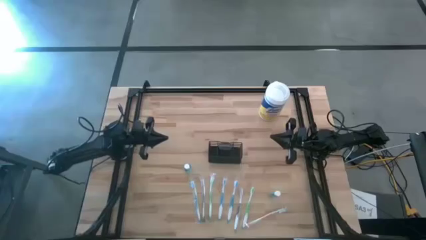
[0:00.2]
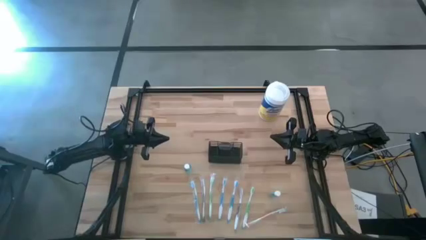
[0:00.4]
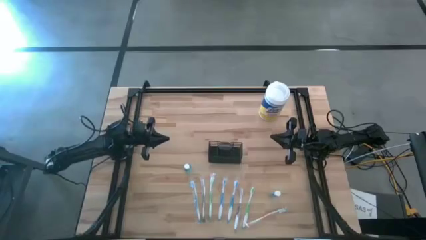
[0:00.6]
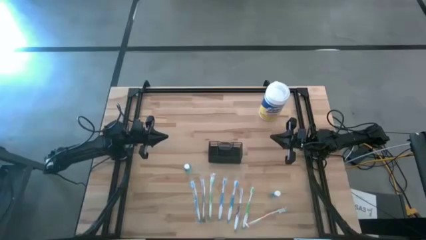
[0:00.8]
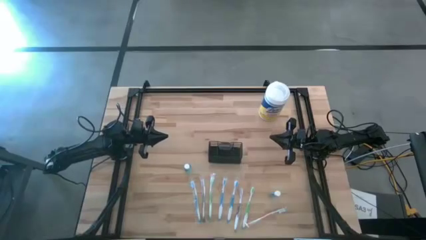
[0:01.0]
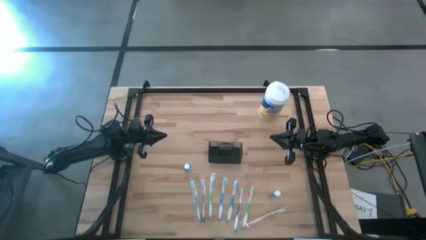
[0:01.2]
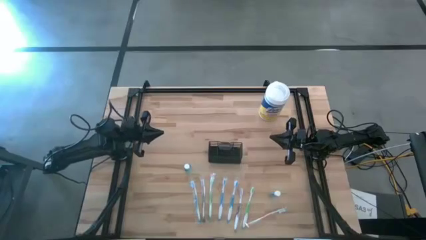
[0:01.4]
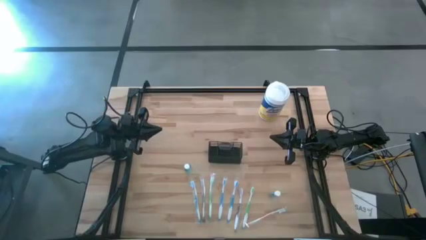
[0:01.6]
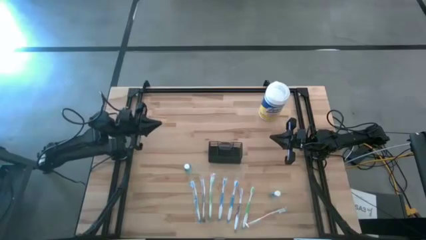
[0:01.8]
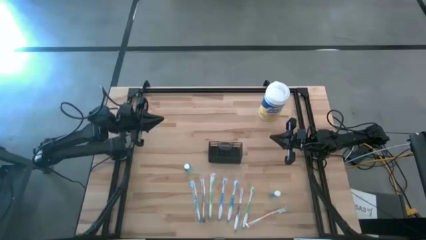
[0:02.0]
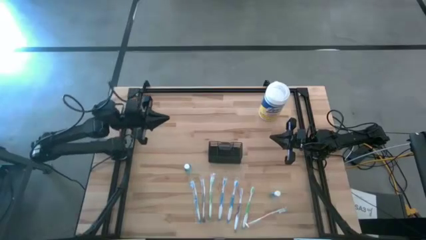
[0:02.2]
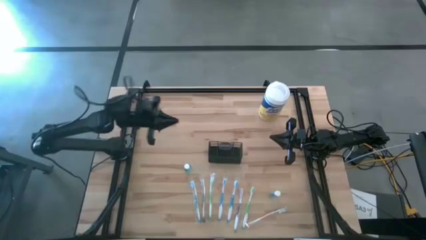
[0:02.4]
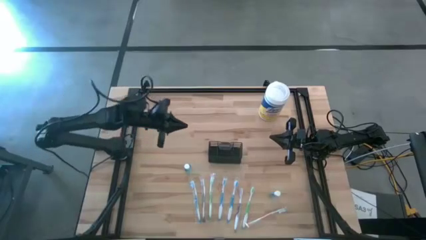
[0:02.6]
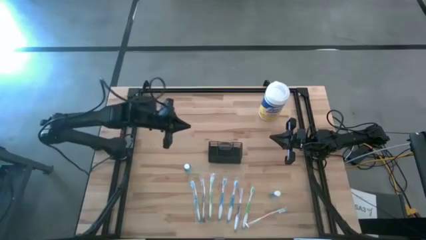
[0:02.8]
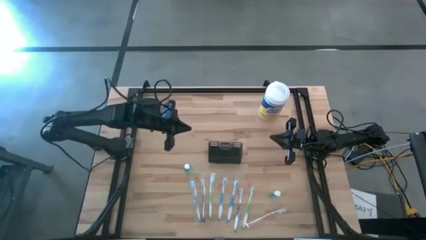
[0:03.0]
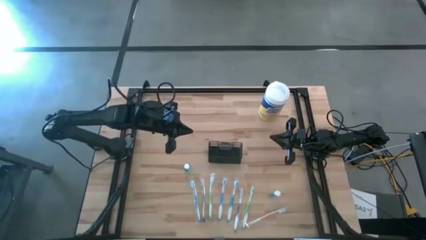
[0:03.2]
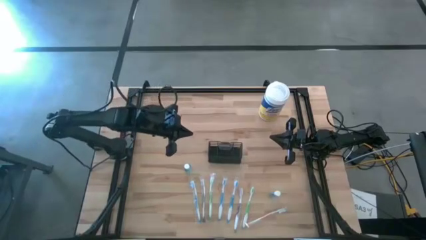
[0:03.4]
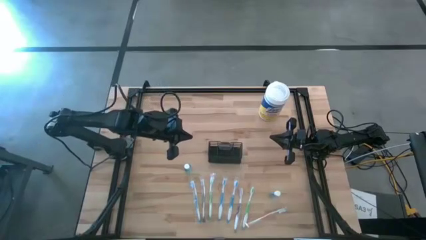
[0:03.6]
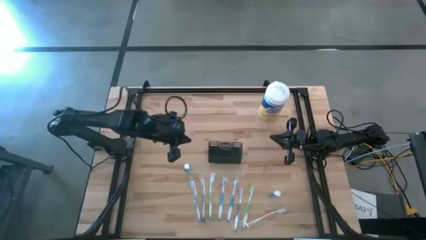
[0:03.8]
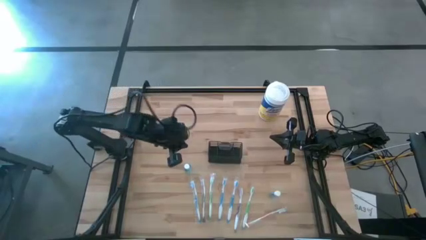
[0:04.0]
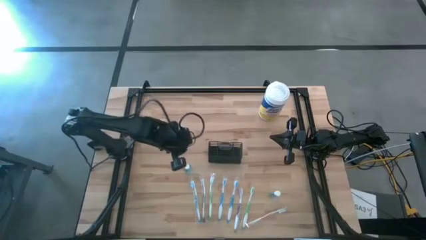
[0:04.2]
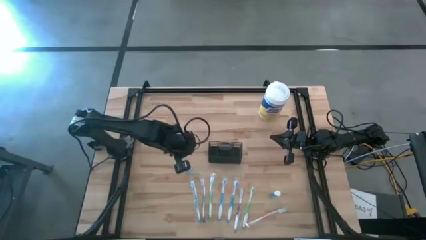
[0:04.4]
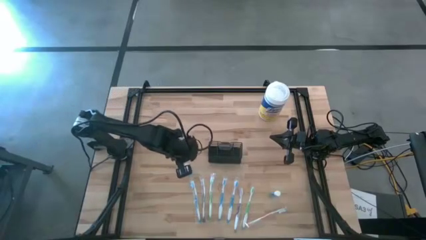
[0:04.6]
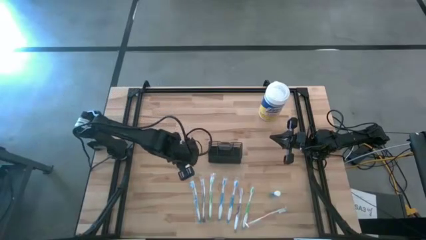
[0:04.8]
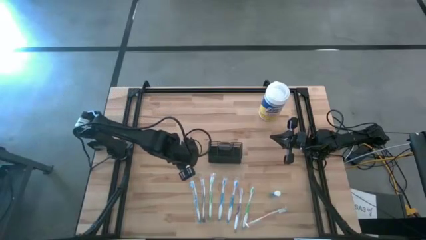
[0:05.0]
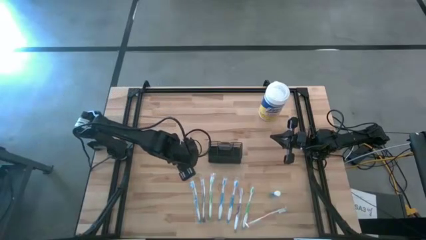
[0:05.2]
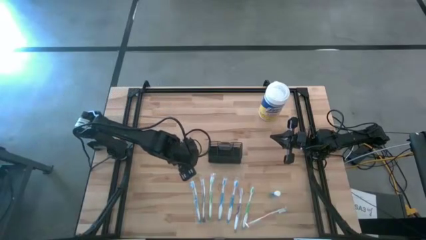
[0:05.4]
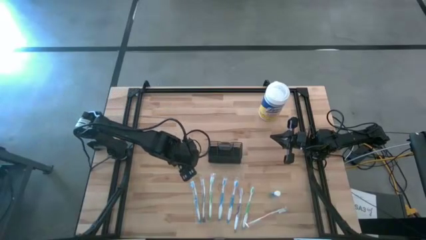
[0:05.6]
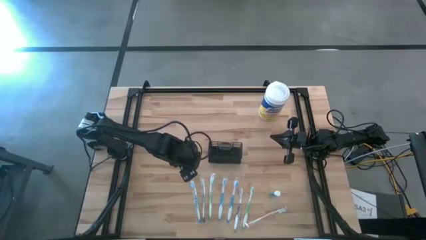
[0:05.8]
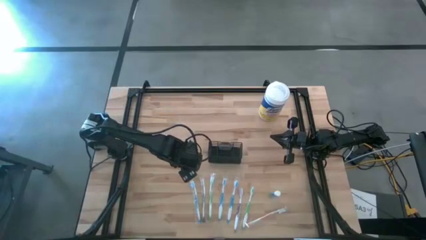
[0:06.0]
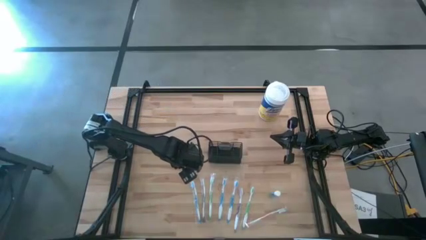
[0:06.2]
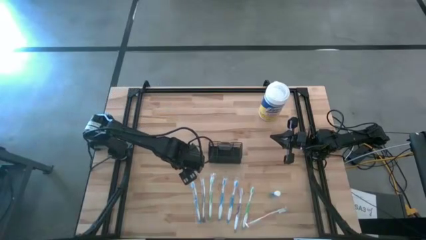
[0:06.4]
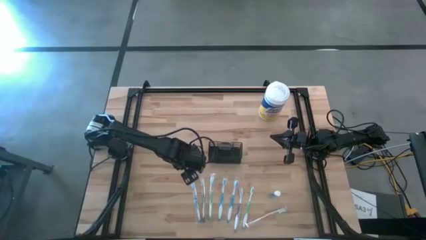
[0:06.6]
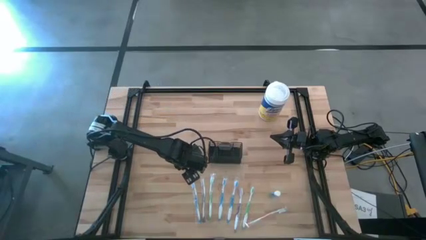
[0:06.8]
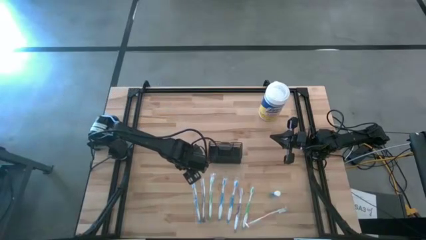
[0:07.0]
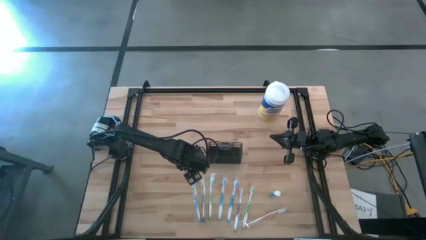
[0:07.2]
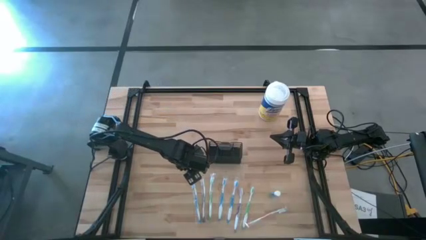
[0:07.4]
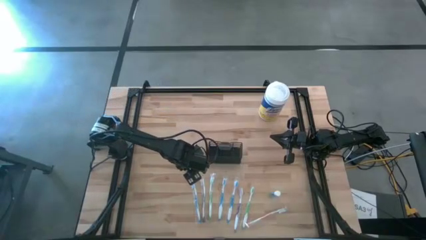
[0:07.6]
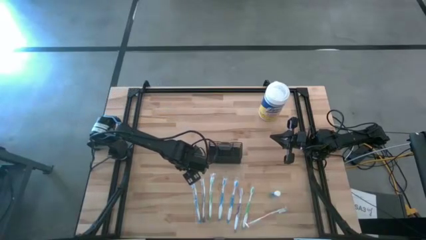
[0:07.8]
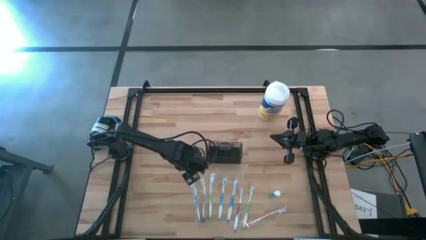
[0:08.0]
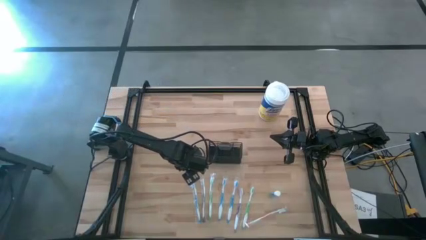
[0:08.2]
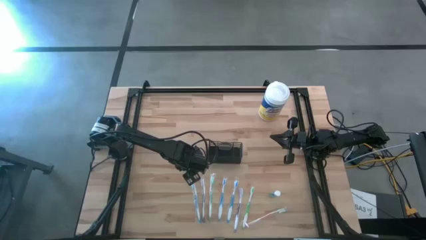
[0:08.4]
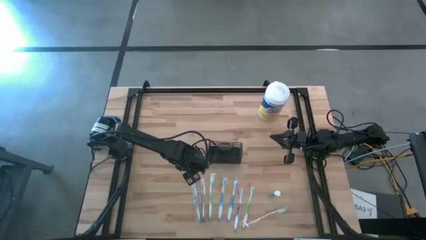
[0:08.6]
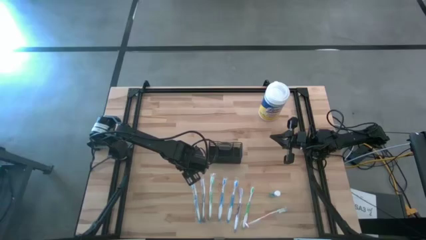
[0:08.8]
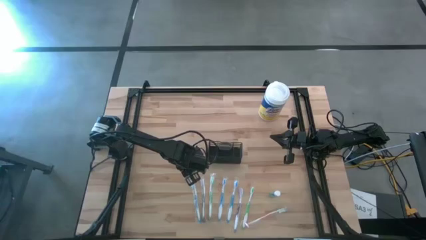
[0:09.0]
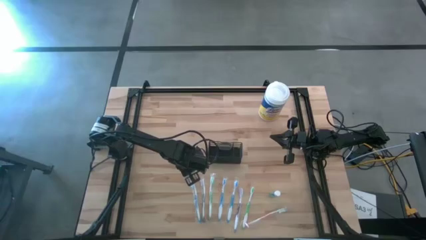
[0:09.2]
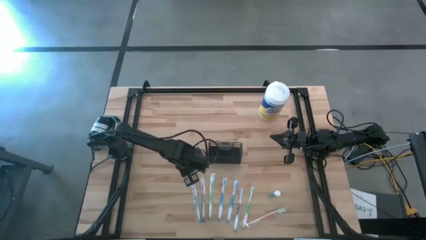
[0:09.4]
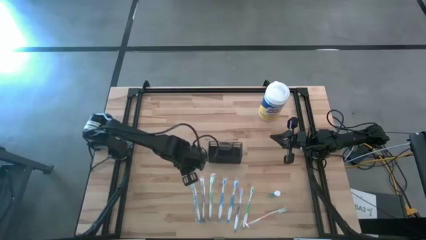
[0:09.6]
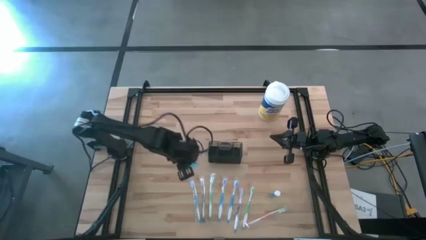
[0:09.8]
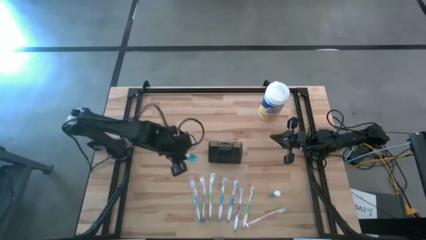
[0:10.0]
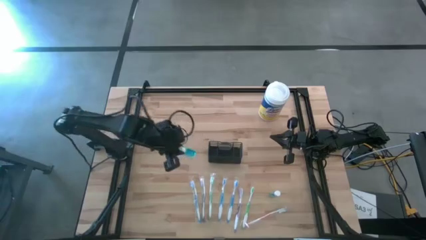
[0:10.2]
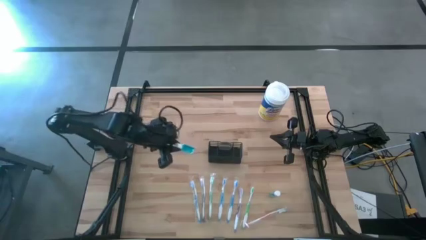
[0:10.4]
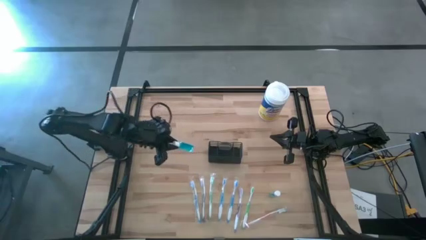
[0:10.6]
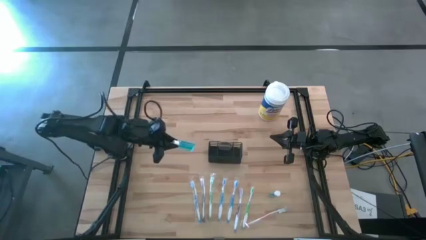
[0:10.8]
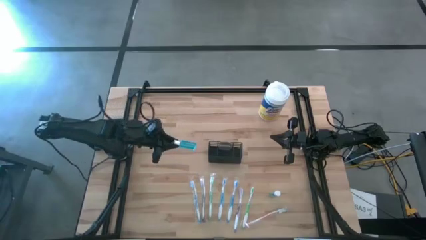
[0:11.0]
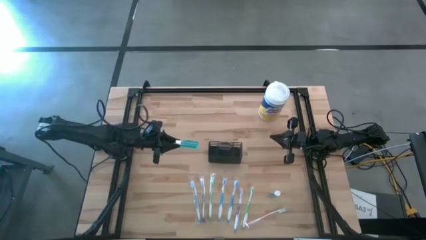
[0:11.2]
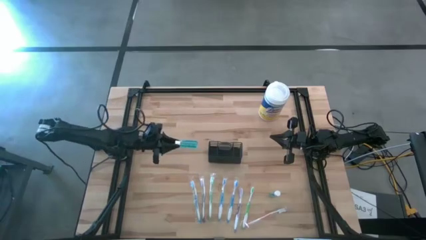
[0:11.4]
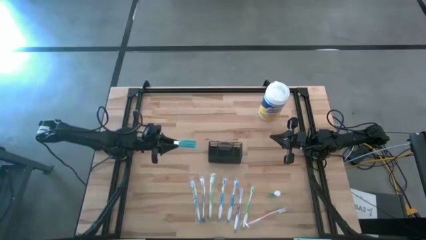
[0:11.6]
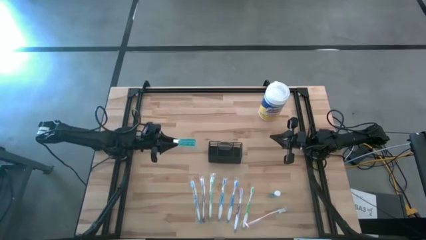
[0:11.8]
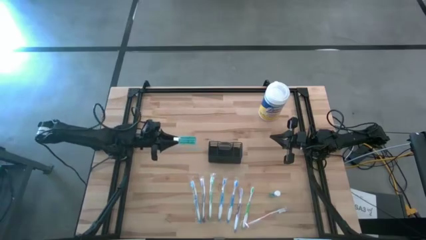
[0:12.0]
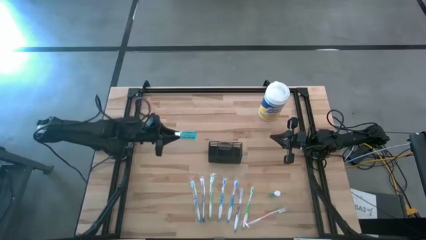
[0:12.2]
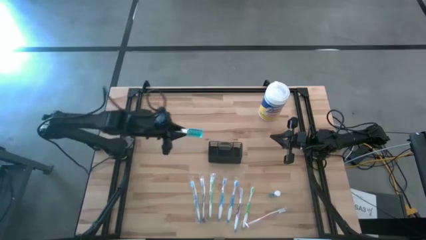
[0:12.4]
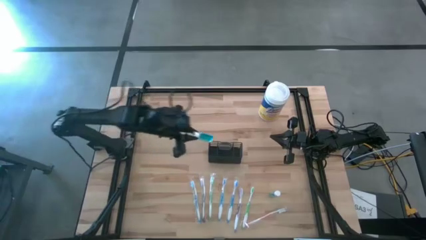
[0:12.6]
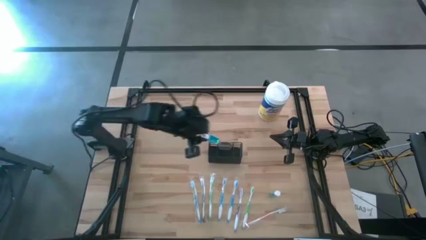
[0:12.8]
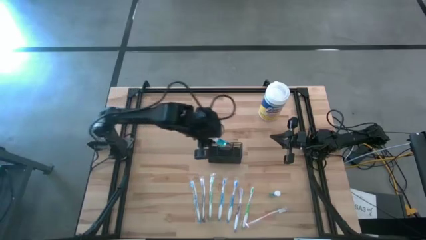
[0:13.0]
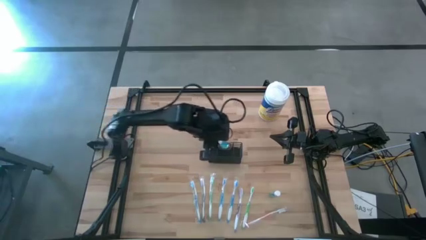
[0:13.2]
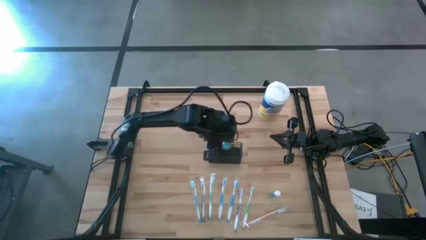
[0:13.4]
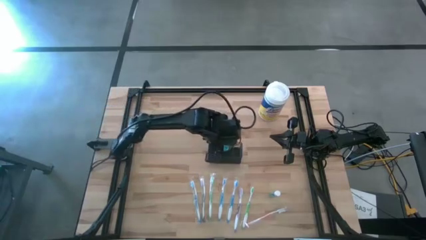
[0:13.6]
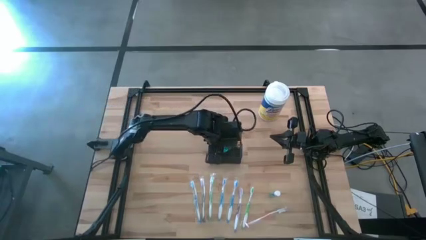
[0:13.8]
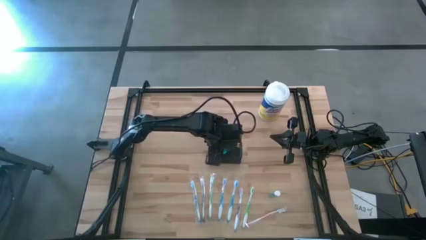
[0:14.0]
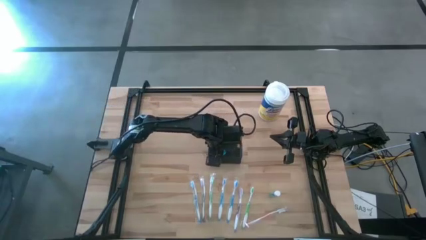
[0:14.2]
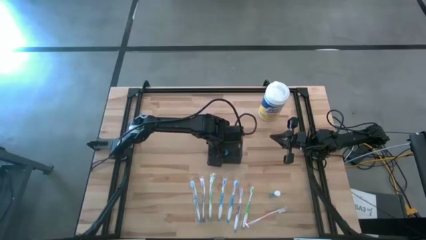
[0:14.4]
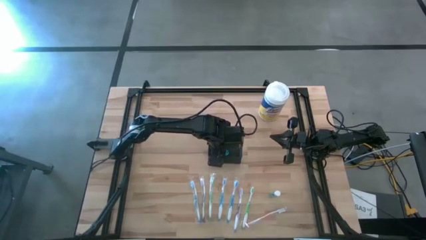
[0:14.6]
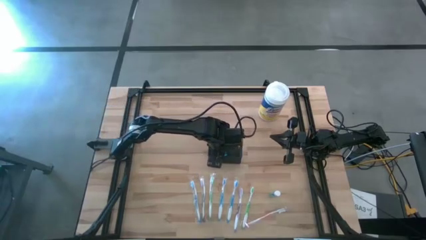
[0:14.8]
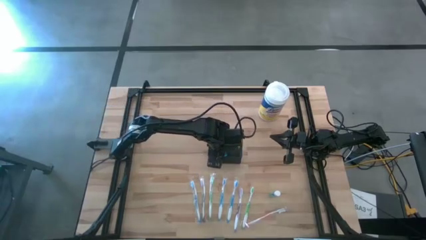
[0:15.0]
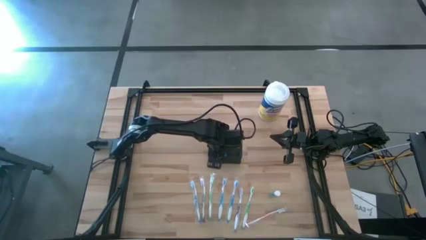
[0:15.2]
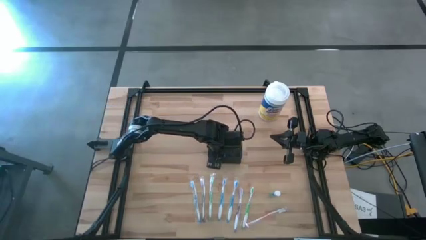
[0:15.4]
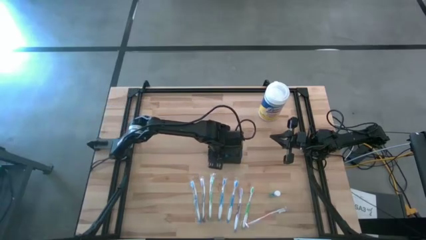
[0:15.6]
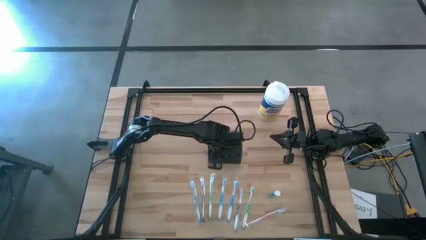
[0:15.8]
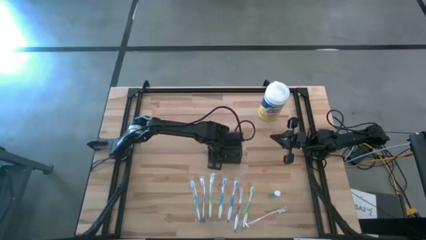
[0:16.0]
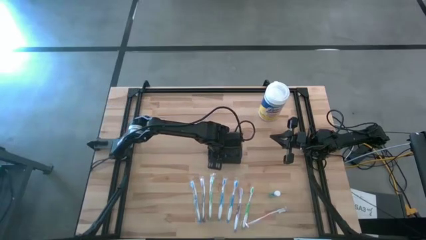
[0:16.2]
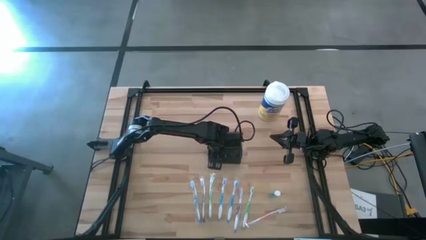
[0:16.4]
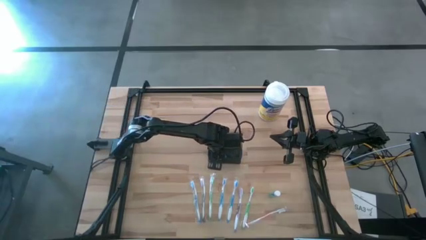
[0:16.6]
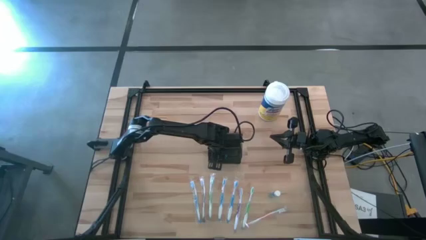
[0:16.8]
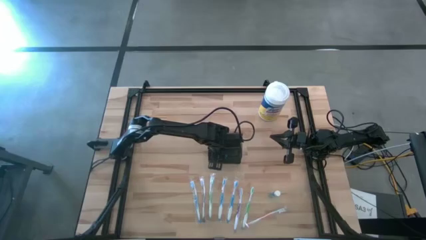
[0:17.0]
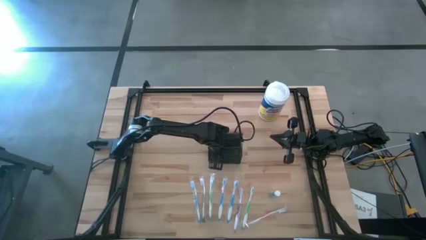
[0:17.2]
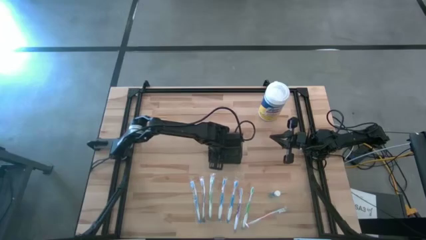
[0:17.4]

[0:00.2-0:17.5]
Task: Pick & Place toothbrushing station
Put the blue mouthwash into the wire organizer
